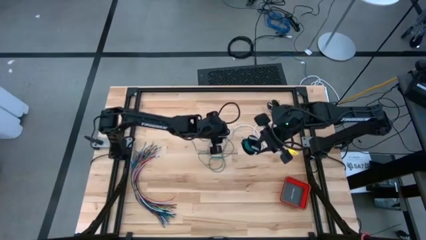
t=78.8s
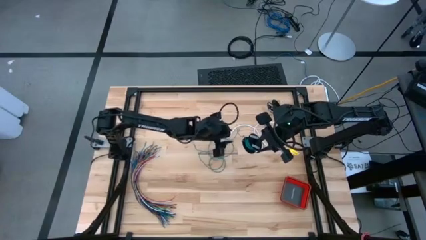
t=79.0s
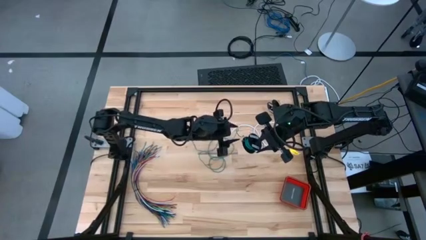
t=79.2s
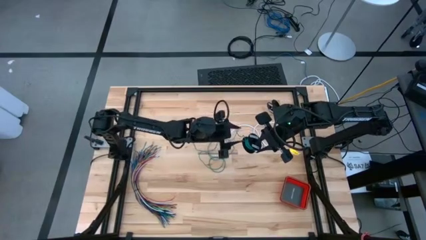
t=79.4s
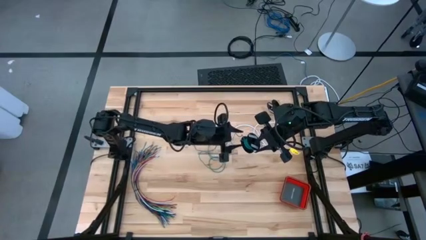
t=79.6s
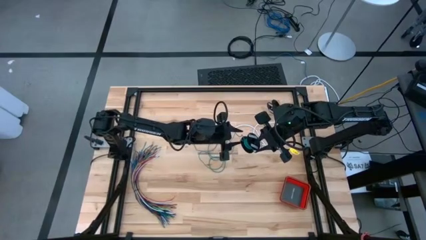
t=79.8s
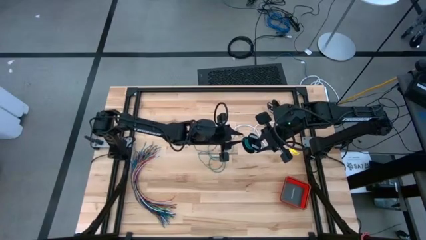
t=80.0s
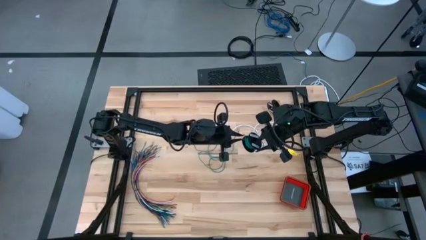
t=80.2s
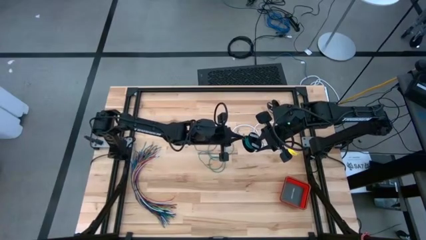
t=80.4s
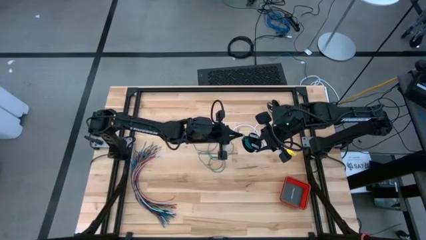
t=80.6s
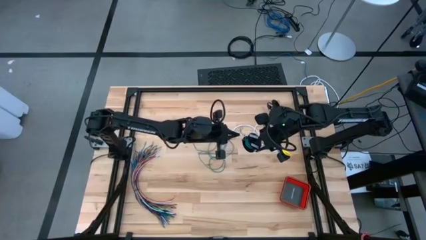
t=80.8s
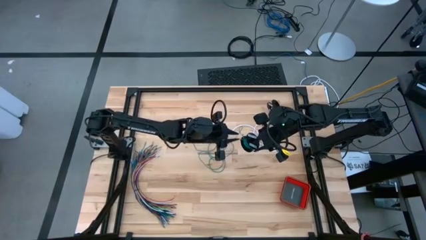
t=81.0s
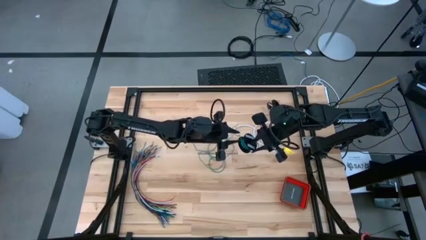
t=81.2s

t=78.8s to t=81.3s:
Task: Coil cords
Uncoil the green wire from the spool

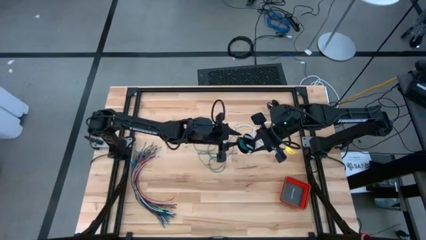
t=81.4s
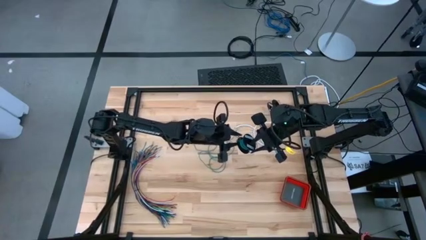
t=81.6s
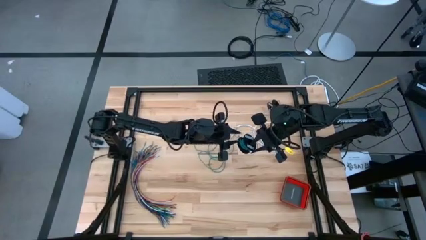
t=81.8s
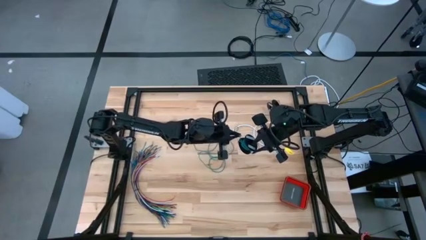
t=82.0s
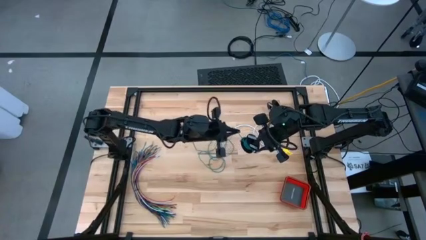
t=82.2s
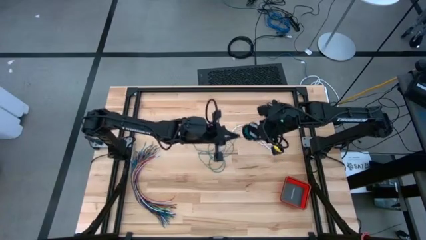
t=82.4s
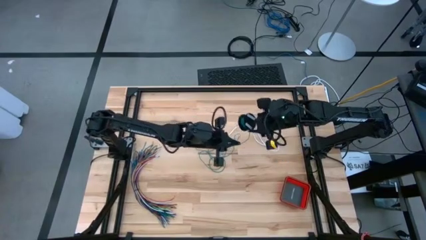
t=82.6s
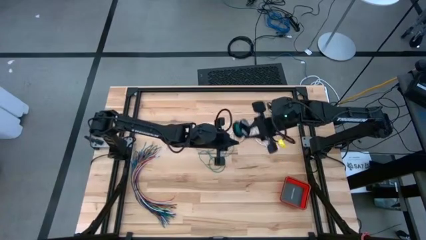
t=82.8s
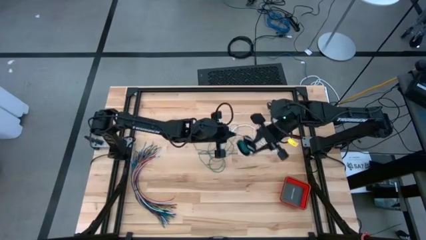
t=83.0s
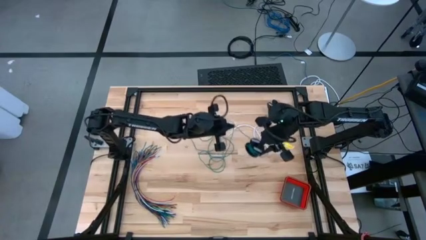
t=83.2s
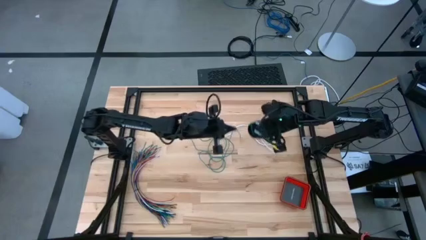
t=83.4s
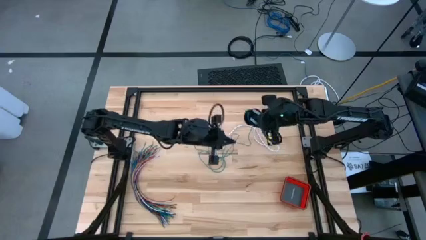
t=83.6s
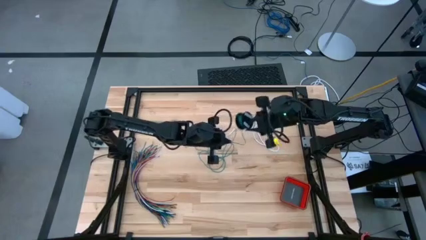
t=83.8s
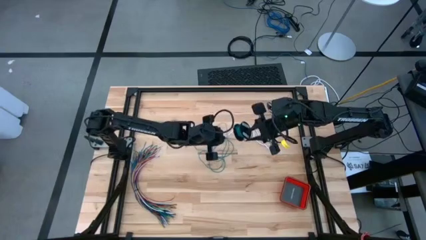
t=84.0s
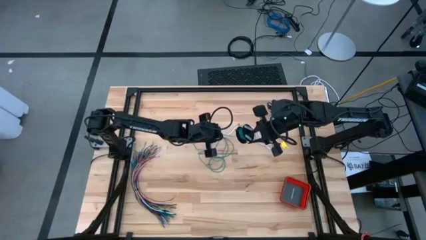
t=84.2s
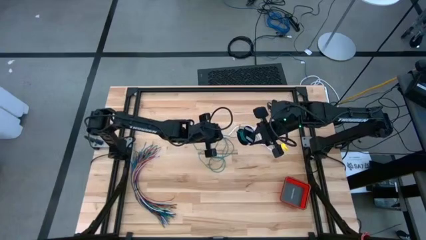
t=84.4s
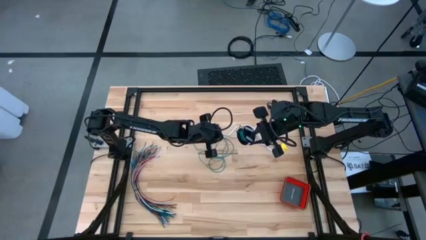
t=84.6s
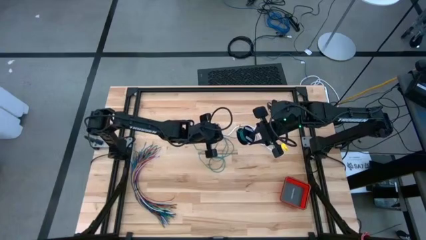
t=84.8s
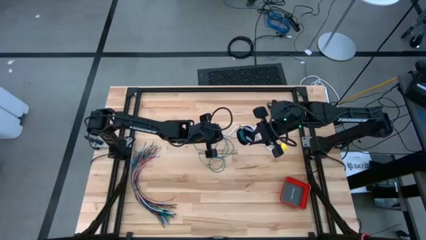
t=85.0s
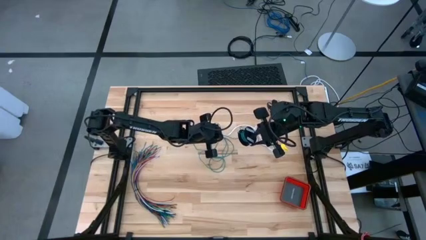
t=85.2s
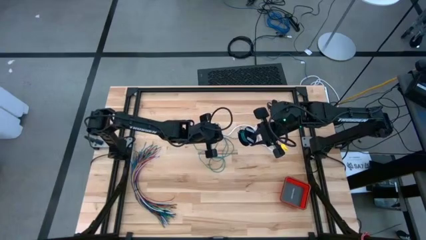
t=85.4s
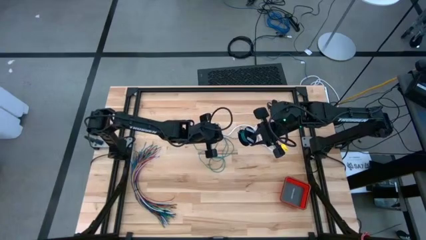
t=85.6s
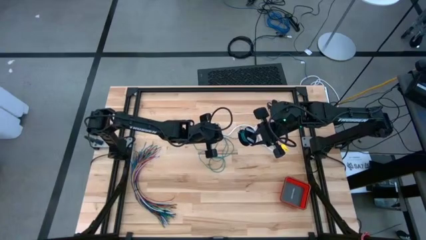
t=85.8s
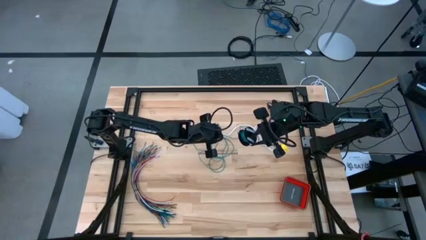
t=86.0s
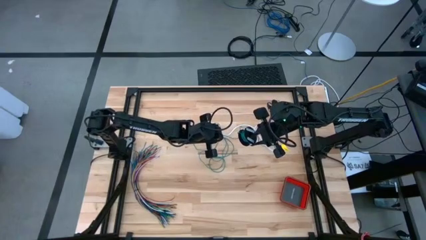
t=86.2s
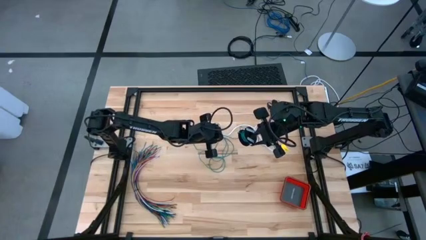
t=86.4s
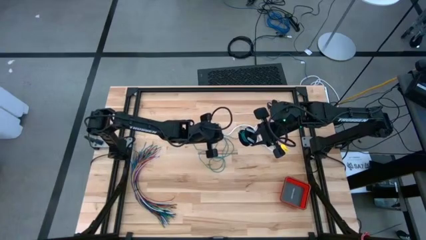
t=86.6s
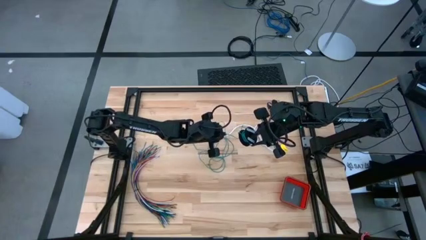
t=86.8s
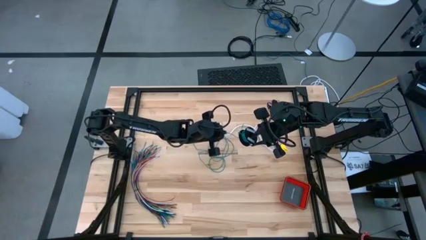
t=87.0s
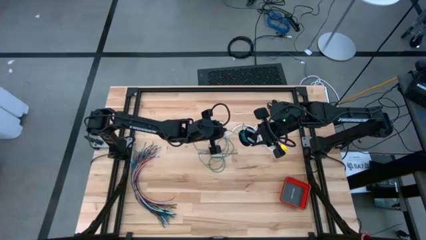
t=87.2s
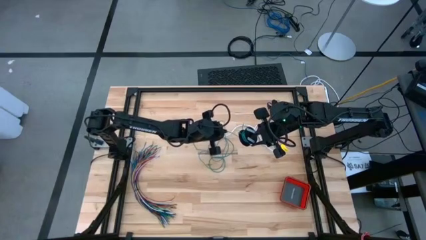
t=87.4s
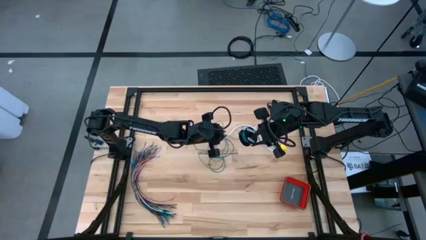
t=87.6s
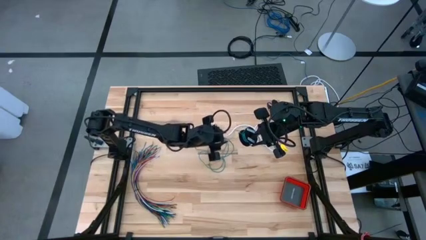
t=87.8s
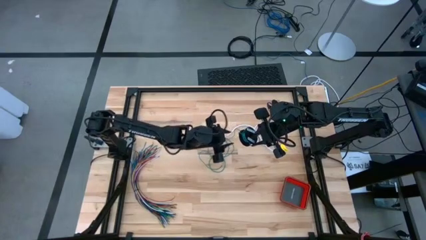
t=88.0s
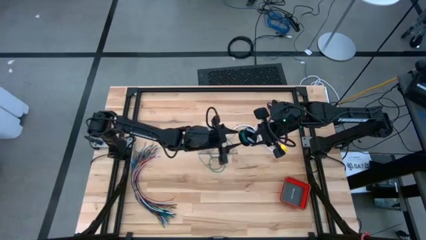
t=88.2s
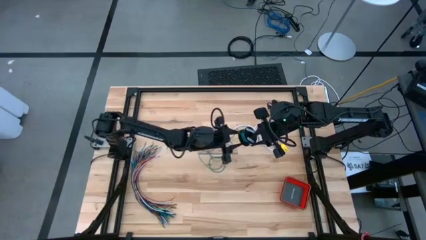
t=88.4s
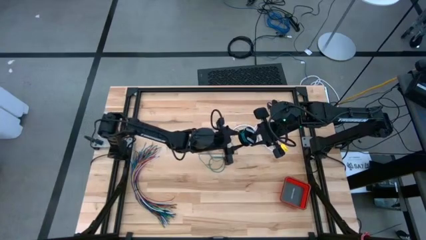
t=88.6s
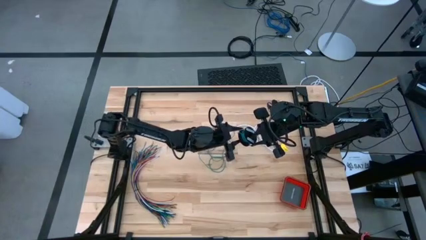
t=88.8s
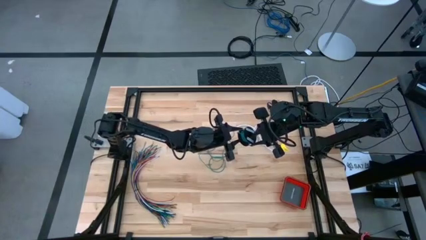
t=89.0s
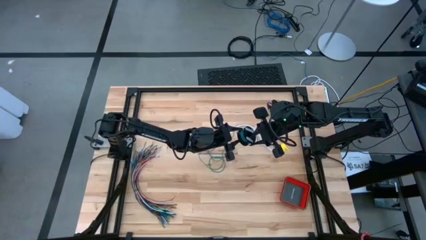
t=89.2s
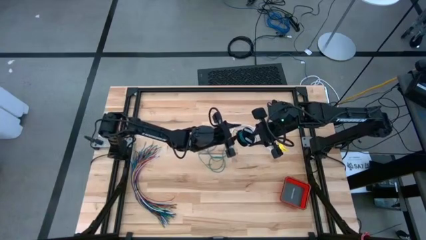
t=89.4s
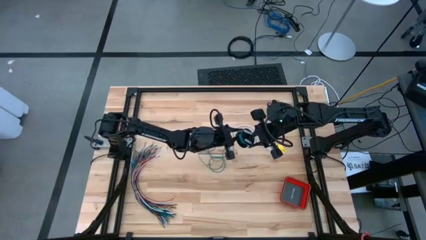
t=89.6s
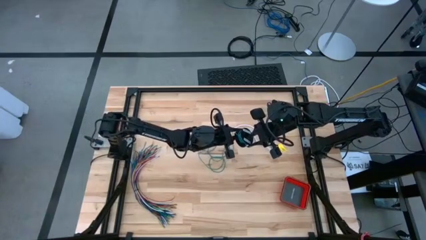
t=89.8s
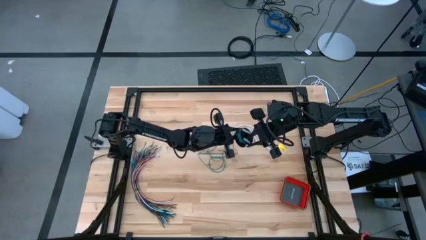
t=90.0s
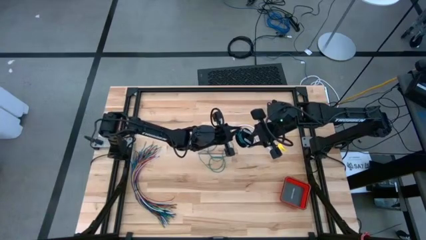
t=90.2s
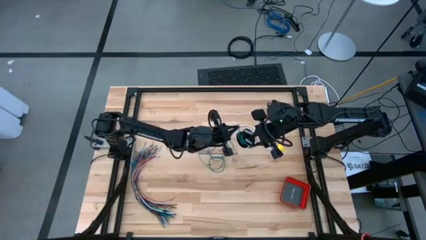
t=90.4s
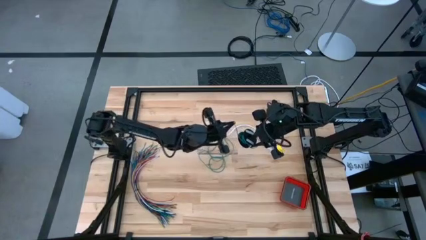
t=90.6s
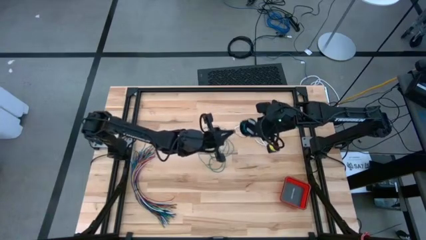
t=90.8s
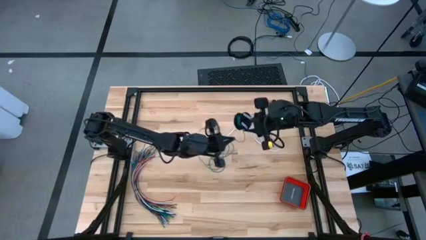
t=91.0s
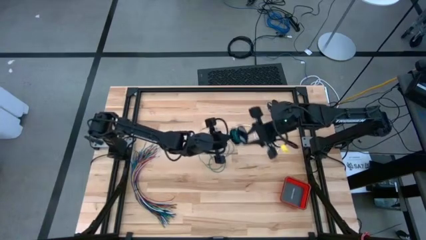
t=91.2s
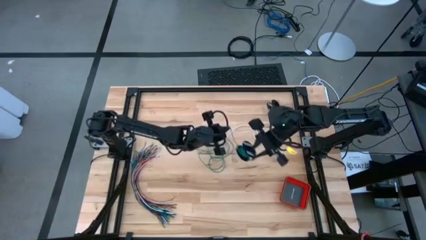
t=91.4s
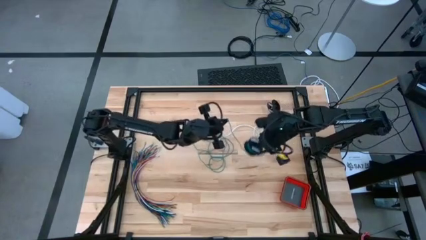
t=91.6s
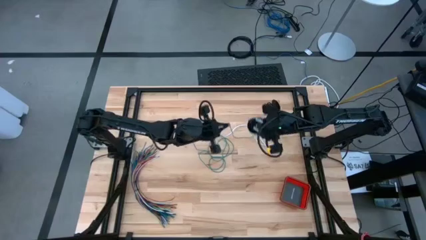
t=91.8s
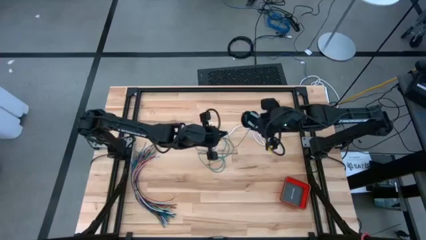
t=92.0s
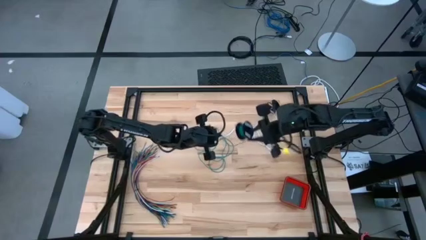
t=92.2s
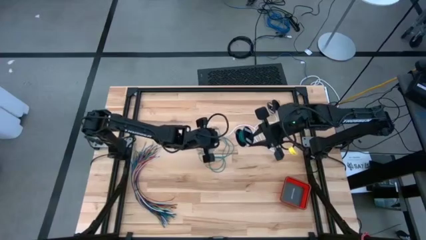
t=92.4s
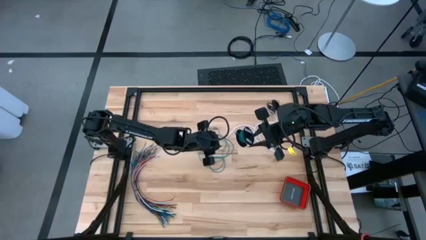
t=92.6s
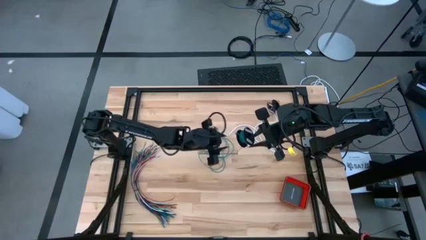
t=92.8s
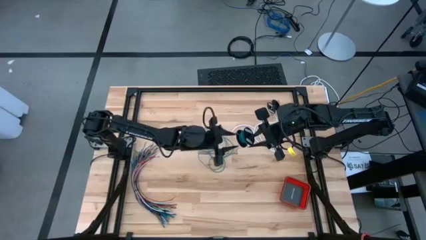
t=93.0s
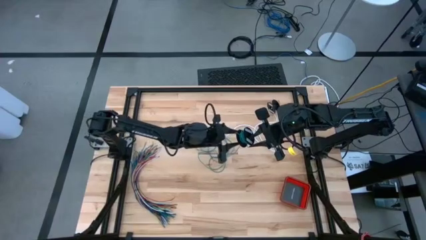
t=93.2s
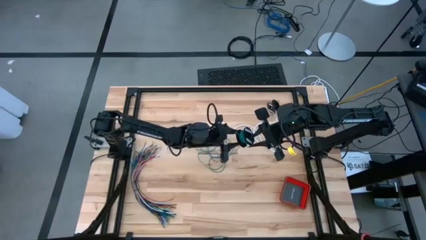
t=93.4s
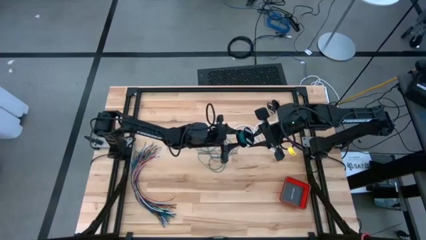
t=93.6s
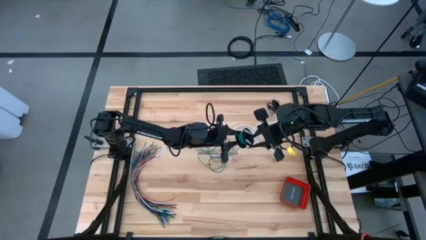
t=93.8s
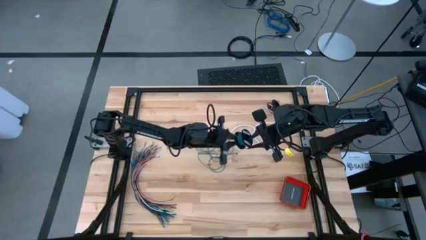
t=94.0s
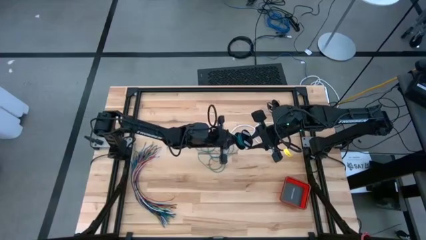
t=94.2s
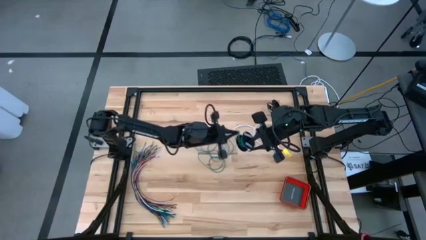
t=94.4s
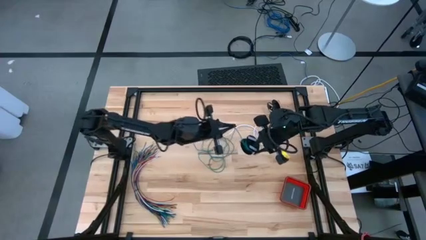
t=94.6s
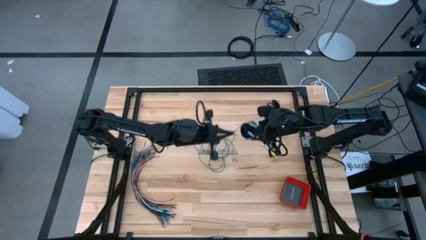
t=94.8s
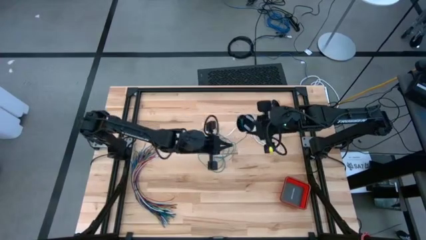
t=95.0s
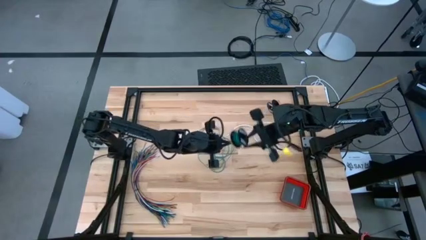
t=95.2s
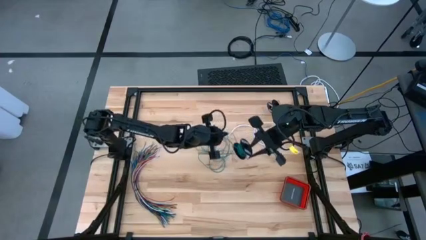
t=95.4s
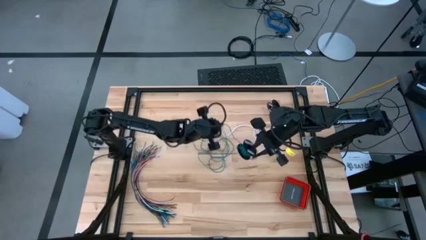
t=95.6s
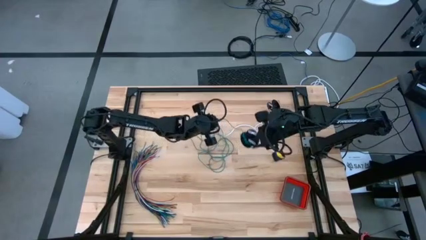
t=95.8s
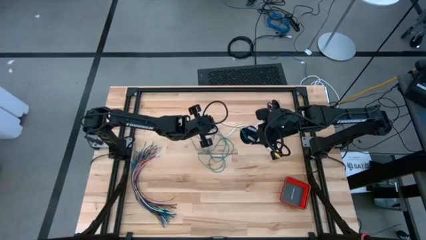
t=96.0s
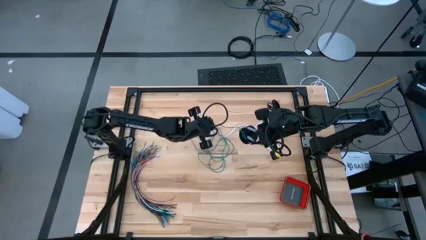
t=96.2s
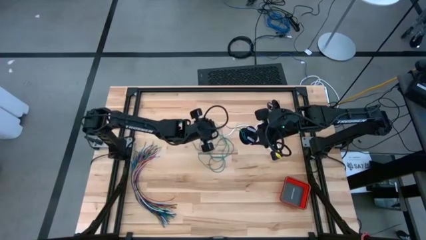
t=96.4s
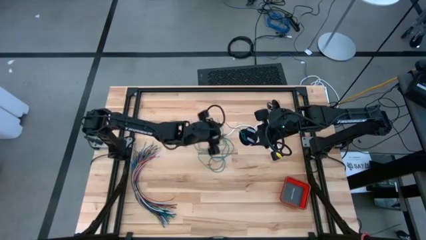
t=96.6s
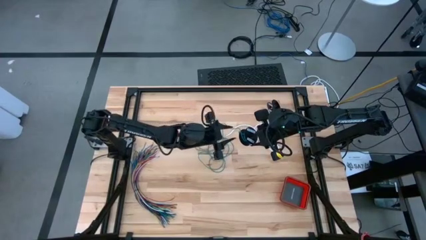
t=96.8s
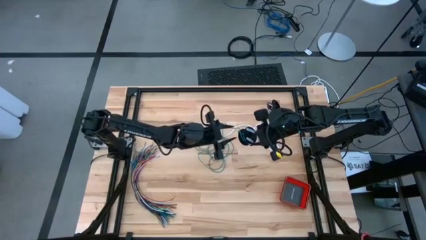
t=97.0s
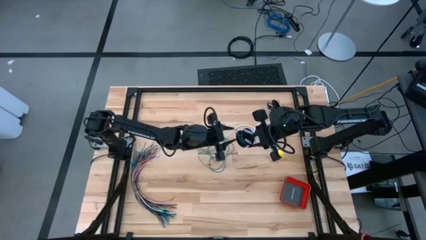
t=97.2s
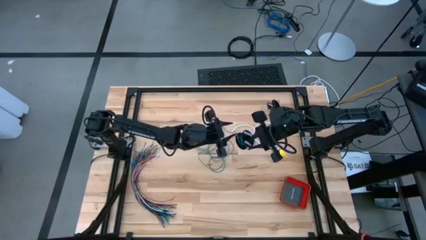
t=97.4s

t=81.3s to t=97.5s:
Uncoil the green wire from the spool
